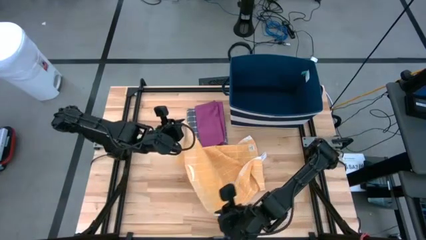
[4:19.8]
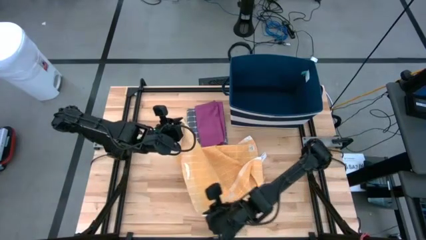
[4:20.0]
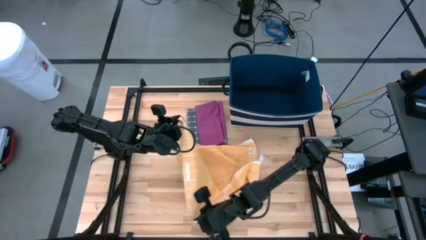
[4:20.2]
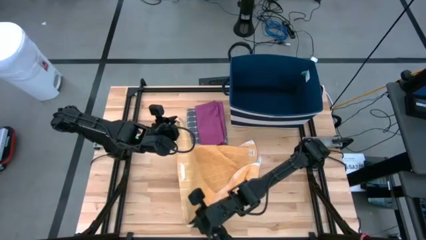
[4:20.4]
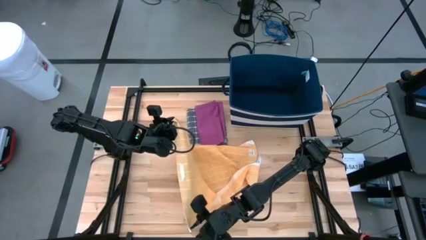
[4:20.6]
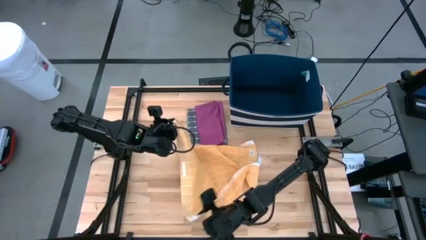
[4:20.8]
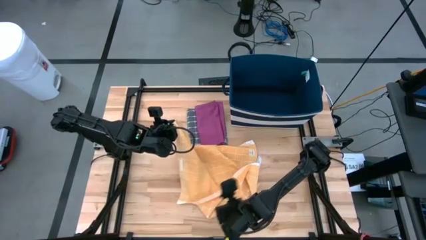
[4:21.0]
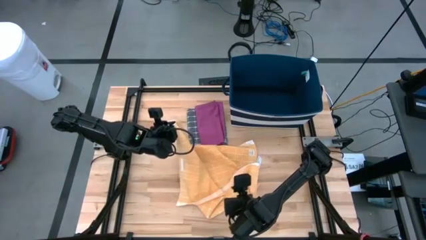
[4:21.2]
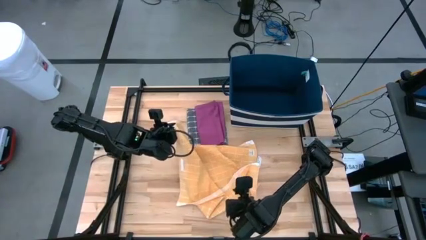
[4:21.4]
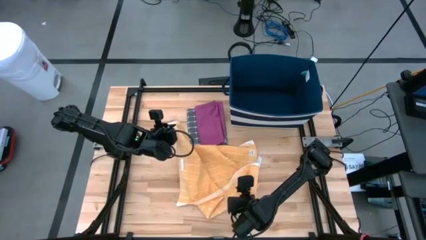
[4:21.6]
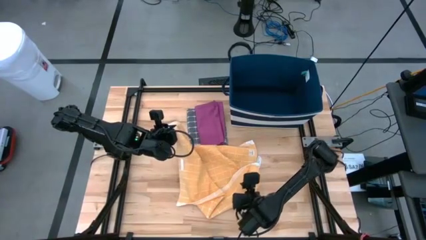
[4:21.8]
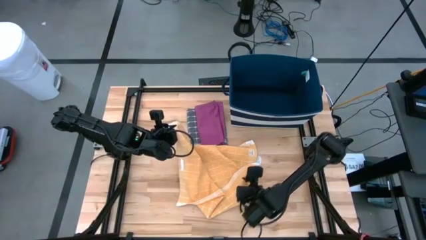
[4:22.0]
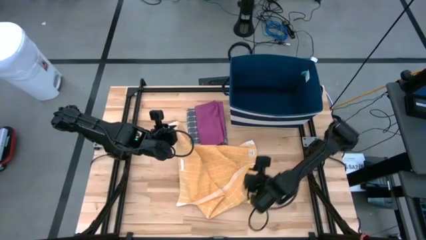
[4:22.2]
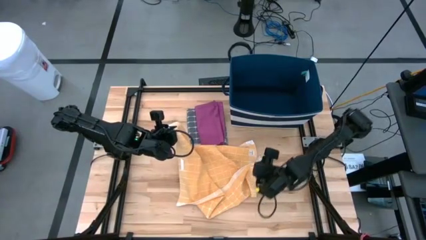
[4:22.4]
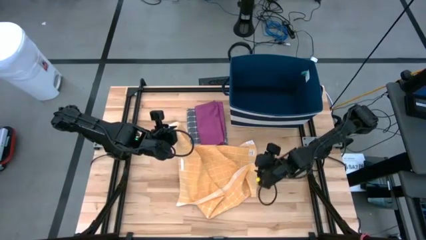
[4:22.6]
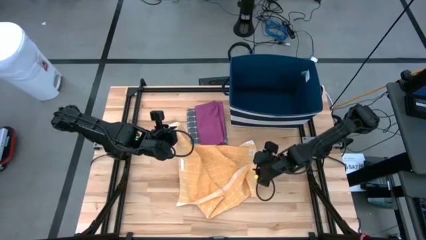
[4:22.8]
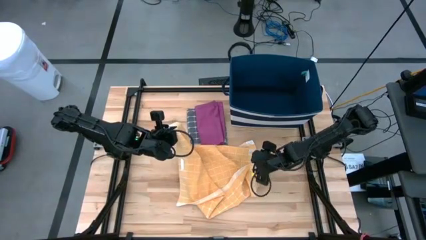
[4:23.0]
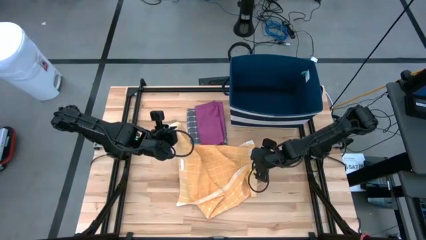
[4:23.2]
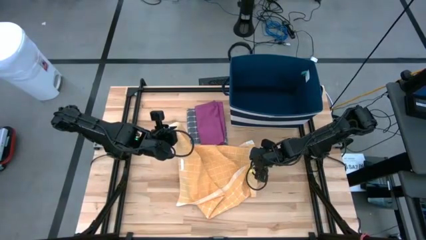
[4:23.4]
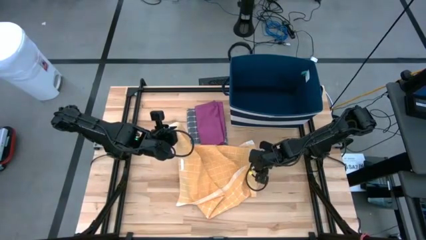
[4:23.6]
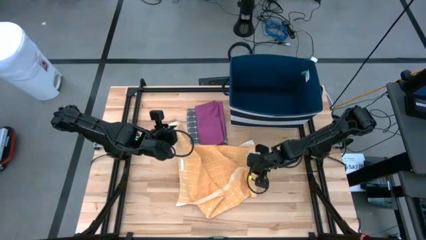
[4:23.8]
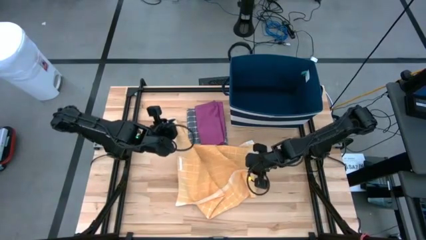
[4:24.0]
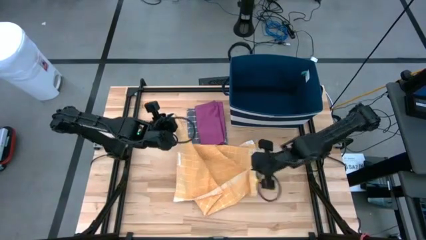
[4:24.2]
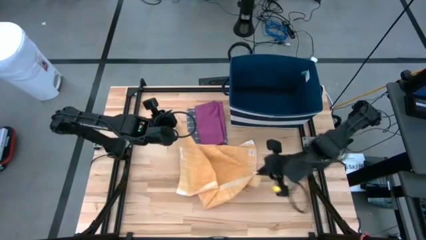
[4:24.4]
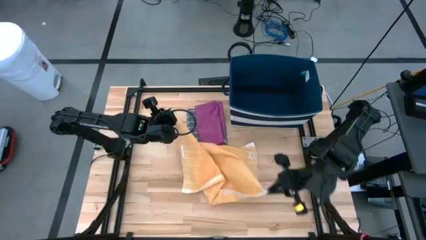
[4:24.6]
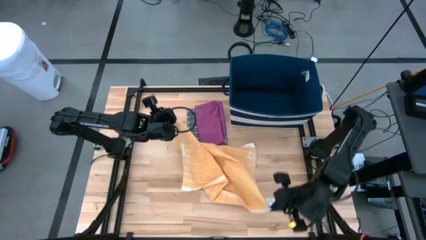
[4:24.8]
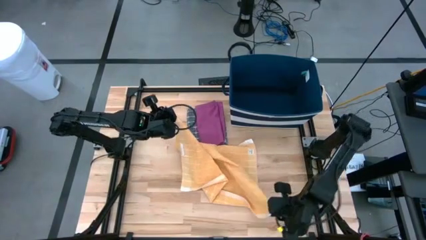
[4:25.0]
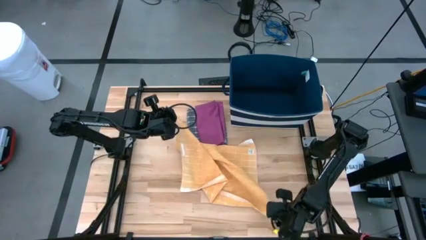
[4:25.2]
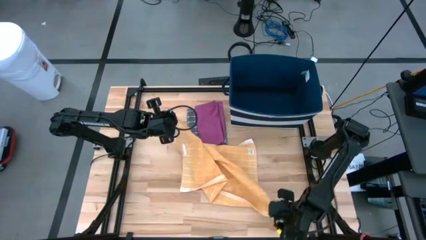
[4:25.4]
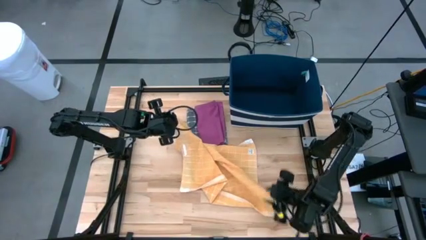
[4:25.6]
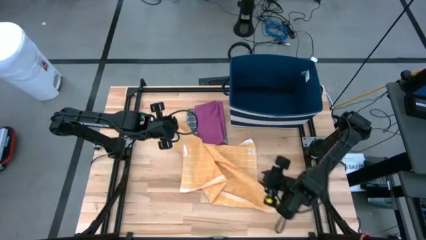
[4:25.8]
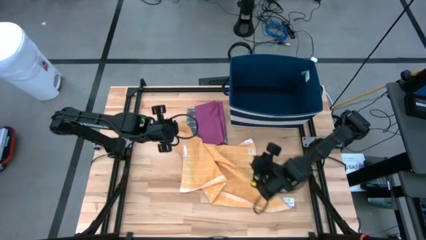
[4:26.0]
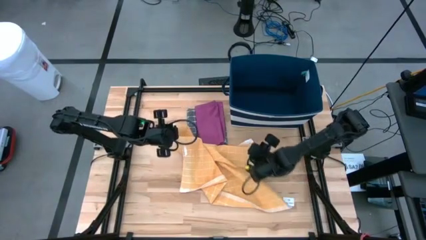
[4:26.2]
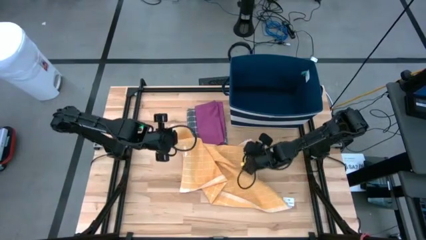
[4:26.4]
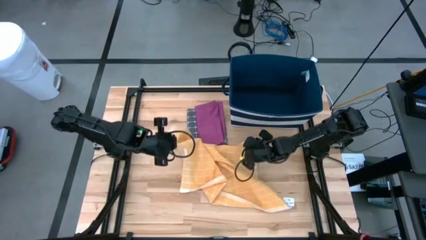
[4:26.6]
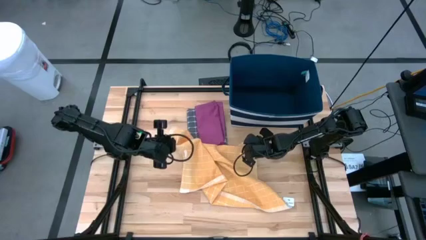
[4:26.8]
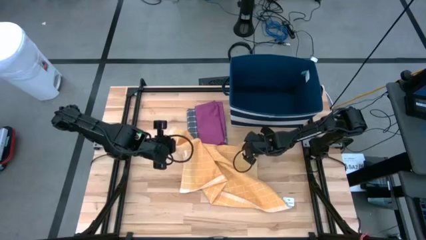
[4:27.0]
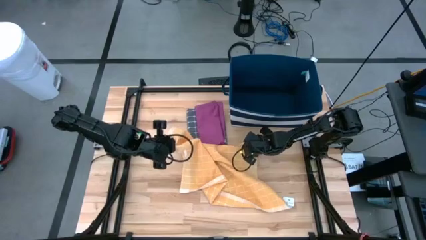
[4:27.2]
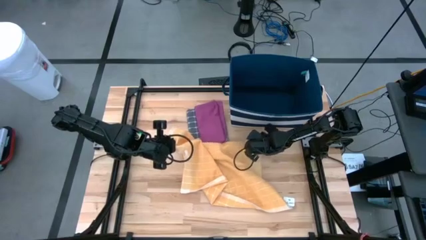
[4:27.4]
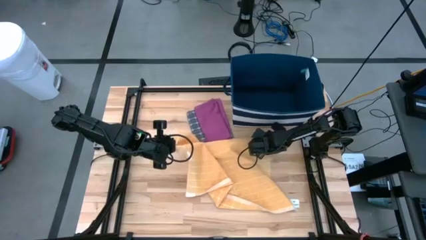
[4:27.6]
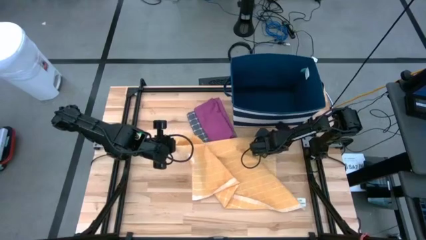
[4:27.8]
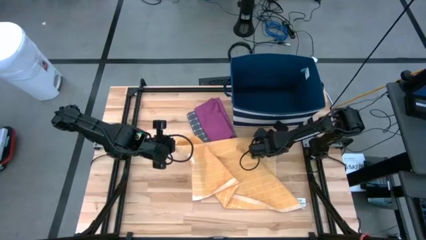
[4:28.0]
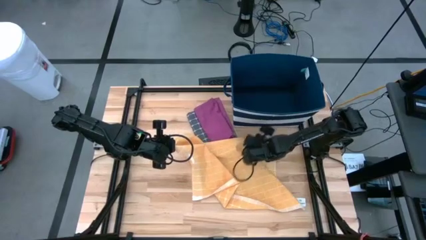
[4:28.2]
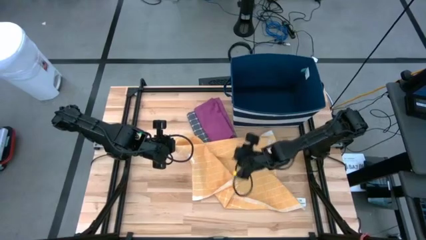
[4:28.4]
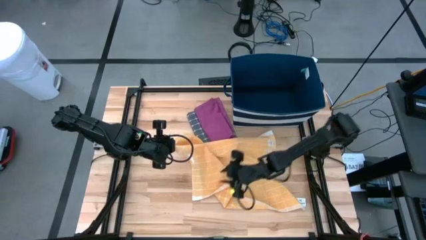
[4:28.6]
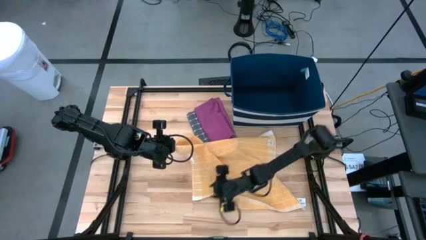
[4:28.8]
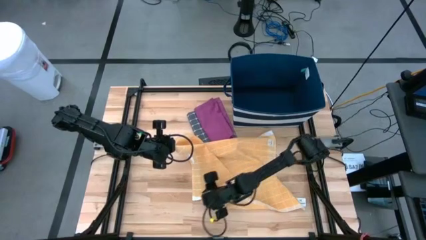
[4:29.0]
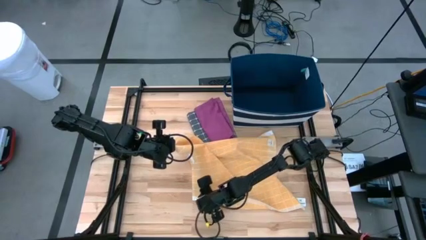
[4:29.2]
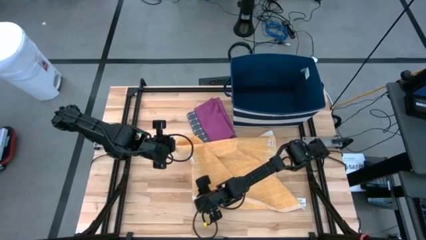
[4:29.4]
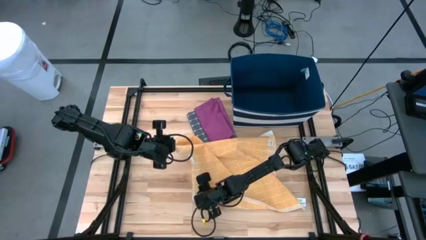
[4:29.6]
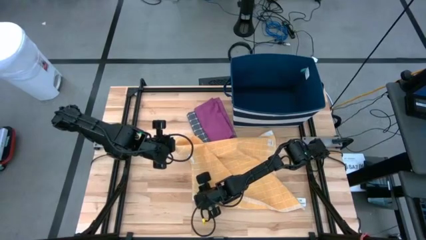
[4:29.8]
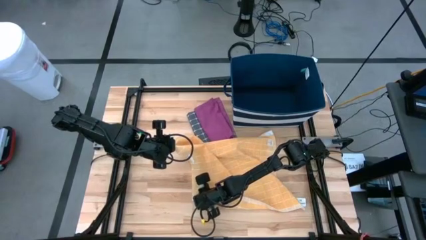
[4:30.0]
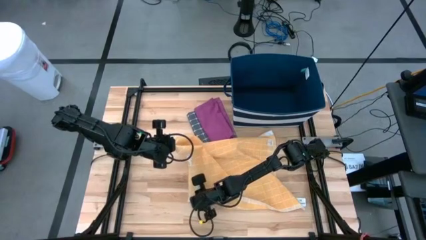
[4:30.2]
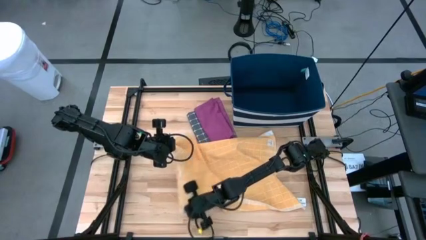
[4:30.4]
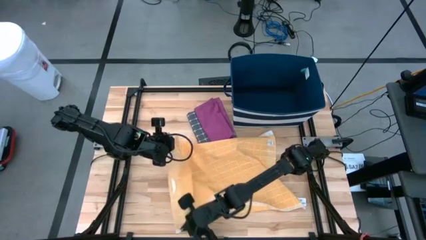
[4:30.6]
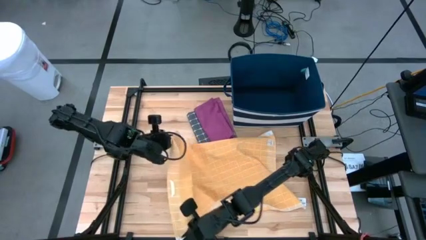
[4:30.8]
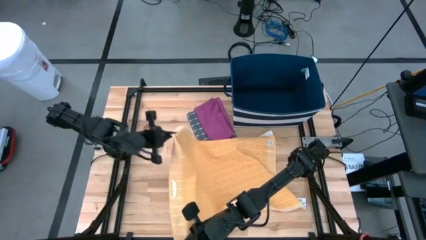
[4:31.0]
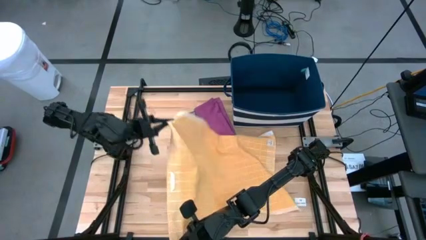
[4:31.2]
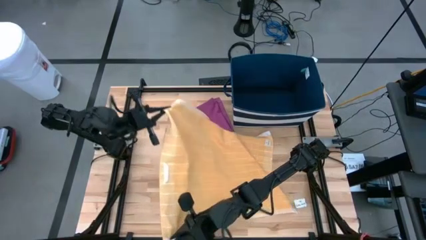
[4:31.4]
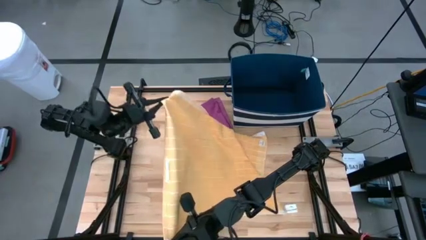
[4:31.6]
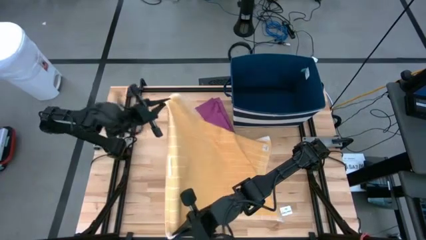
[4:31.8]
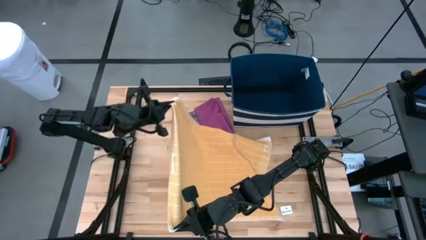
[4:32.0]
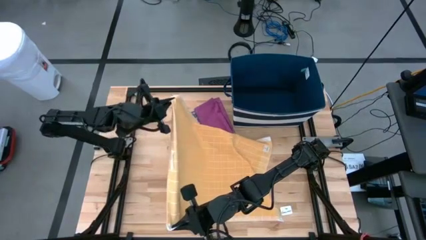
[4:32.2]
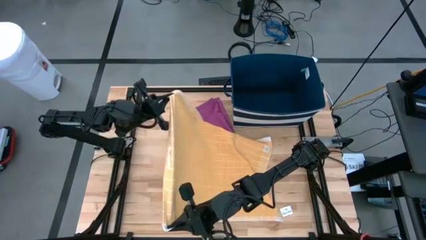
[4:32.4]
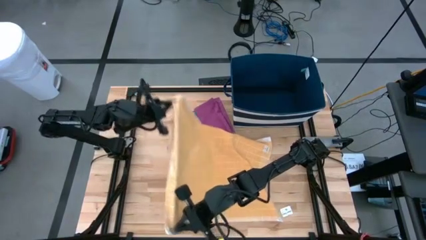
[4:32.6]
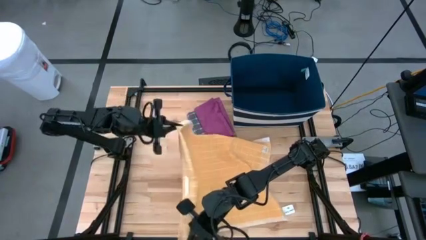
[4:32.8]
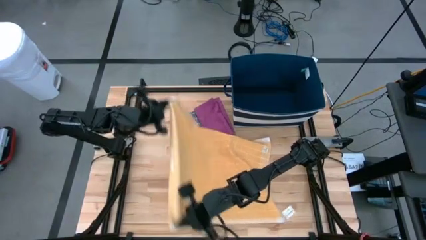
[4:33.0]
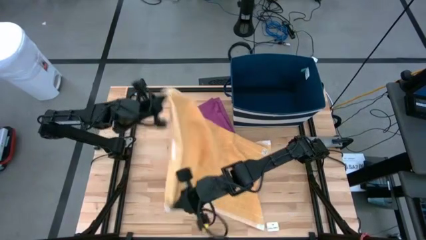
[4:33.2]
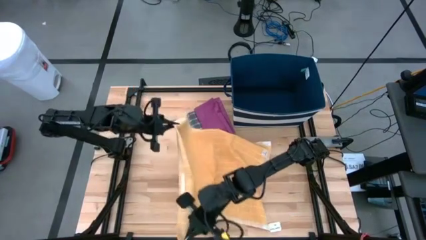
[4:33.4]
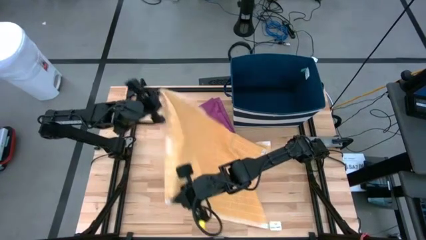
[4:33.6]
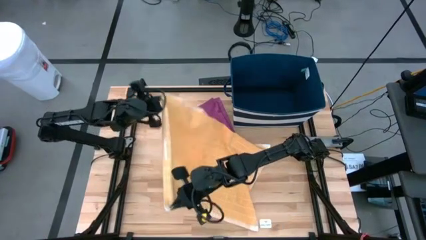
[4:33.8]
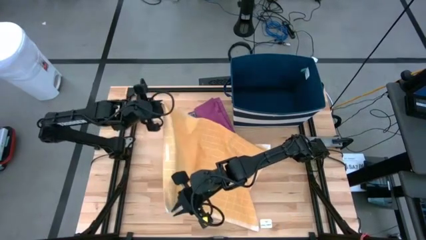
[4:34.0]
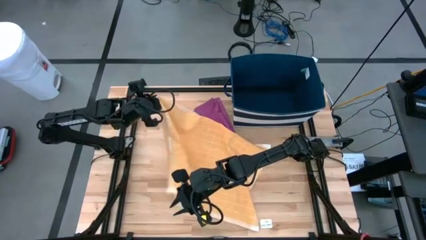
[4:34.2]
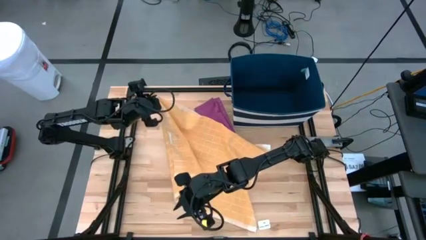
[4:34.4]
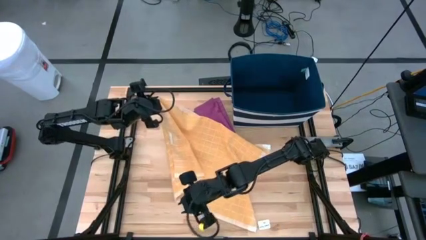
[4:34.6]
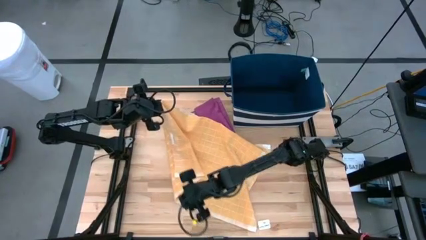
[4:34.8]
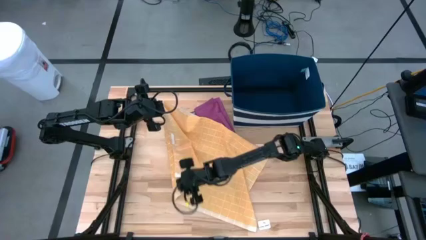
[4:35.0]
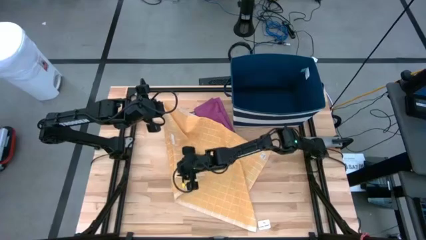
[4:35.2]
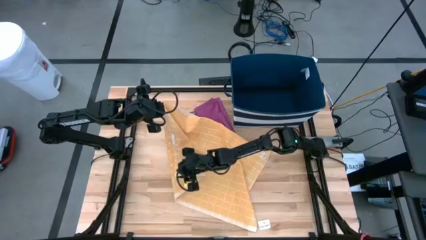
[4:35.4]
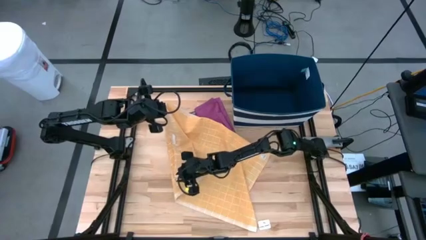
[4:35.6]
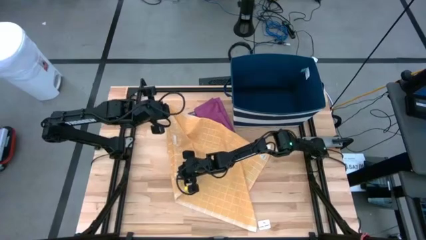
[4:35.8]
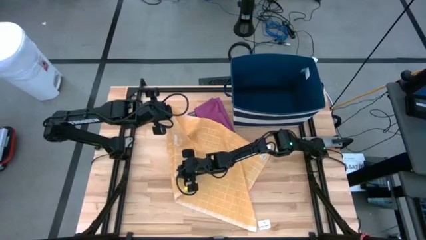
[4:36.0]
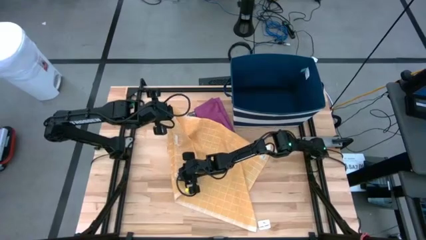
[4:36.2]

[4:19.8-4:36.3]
Task: Fold towel
Fold the orange checkered towel

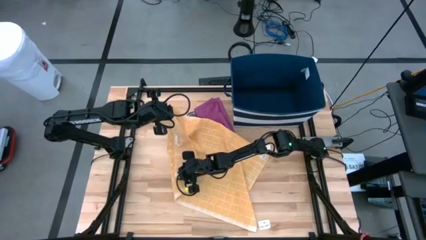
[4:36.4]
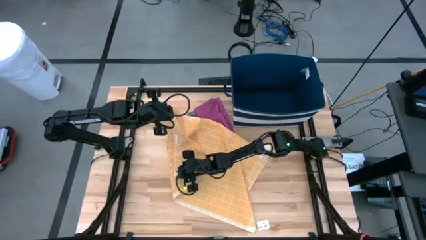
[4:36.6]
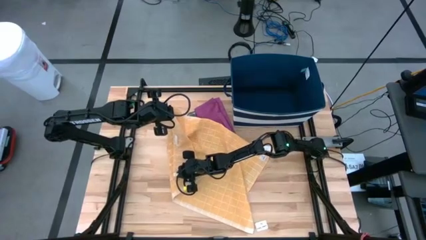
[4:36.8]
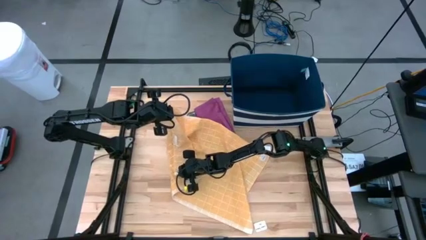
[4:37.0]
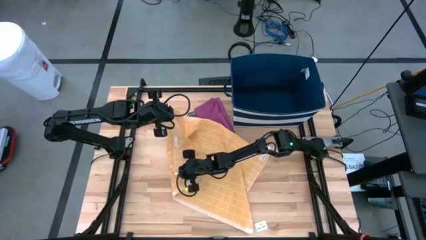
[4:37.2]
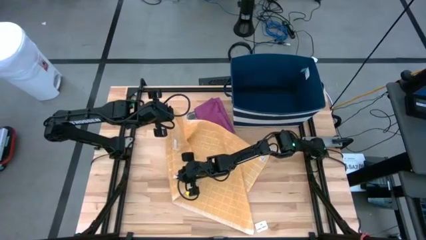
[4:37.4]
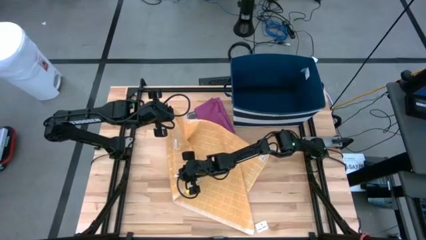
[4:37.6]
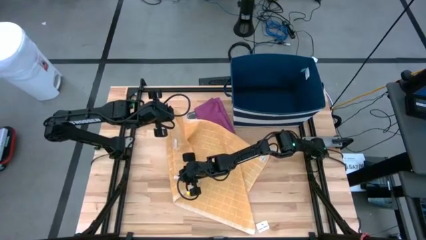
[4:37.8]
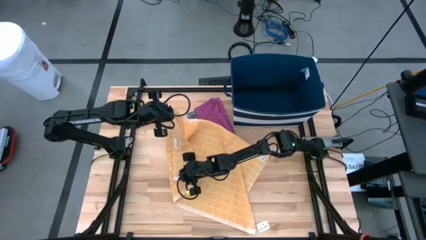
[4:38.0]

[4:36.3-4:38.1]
Fold the orange checkered towel
